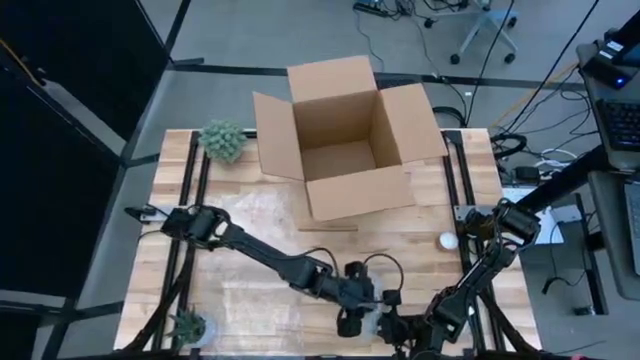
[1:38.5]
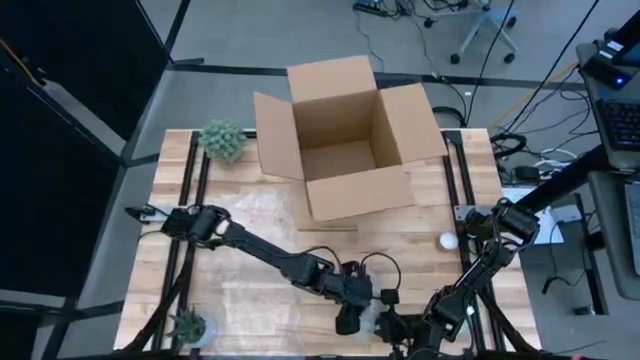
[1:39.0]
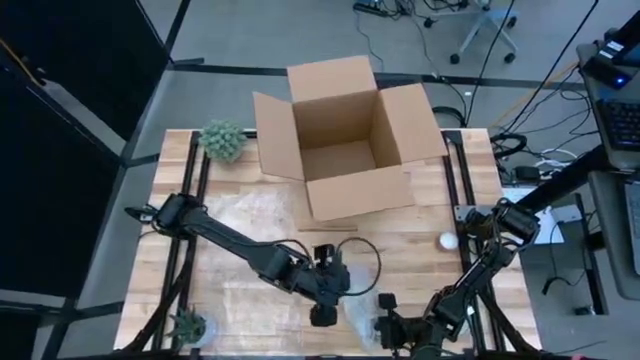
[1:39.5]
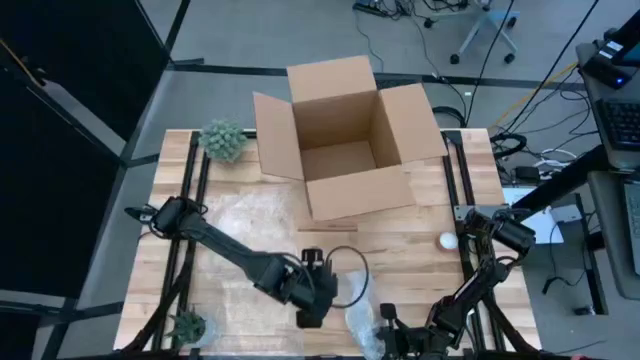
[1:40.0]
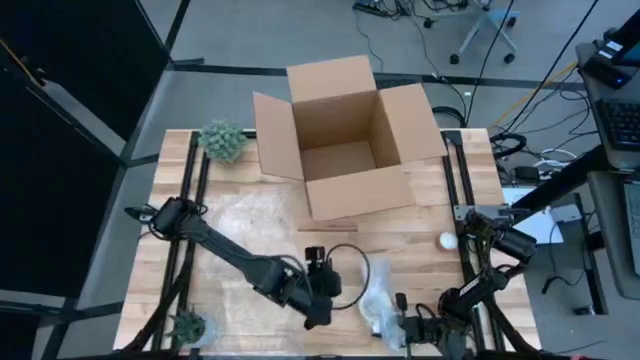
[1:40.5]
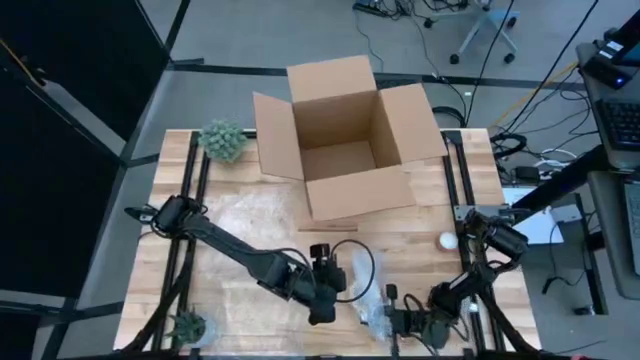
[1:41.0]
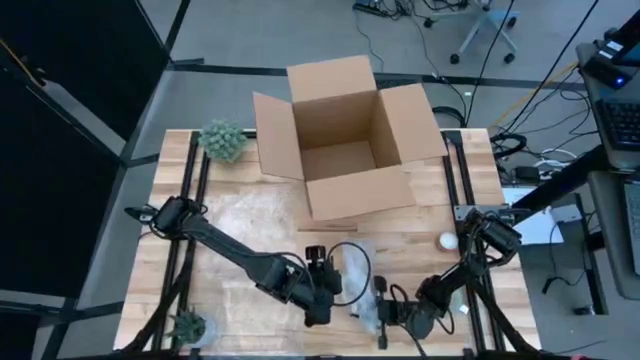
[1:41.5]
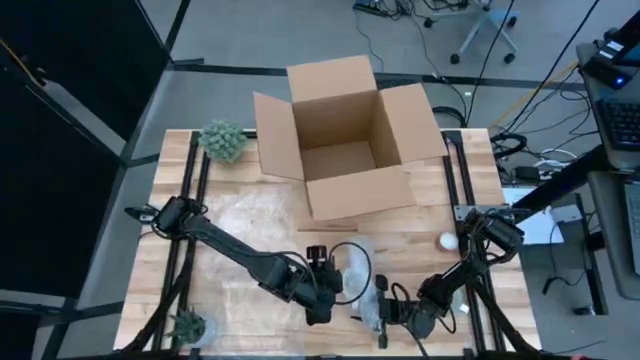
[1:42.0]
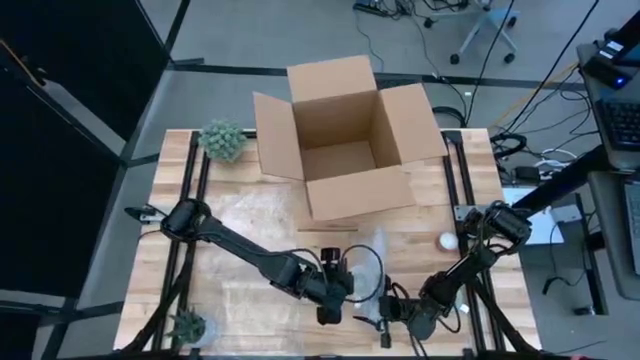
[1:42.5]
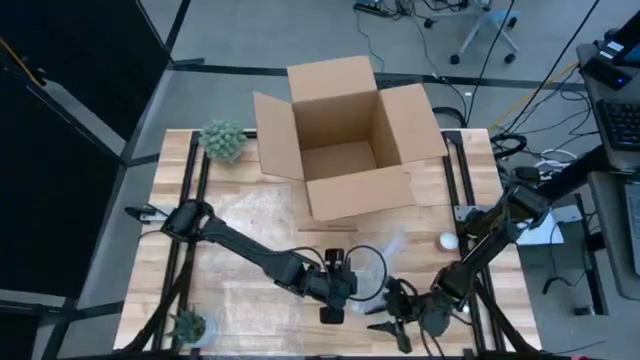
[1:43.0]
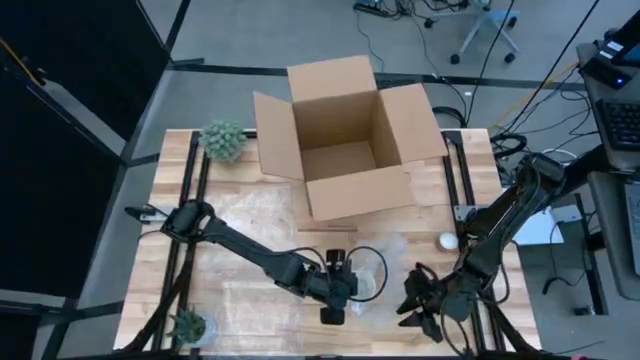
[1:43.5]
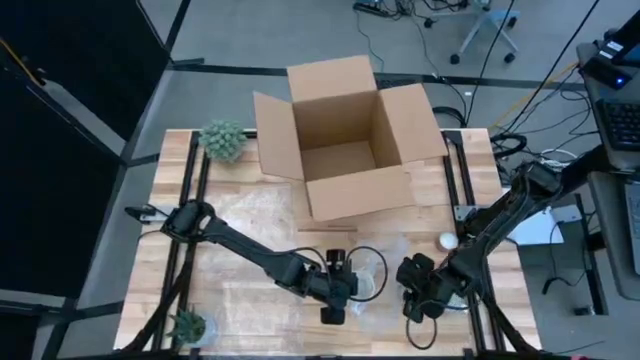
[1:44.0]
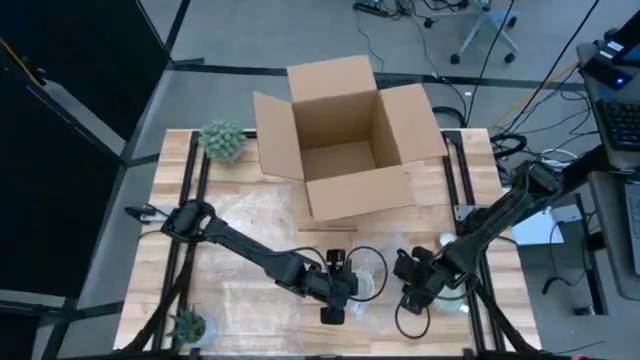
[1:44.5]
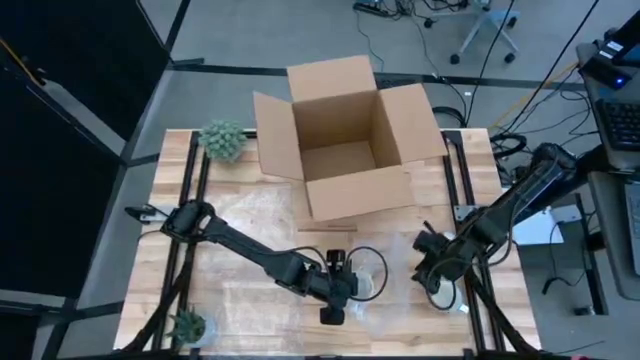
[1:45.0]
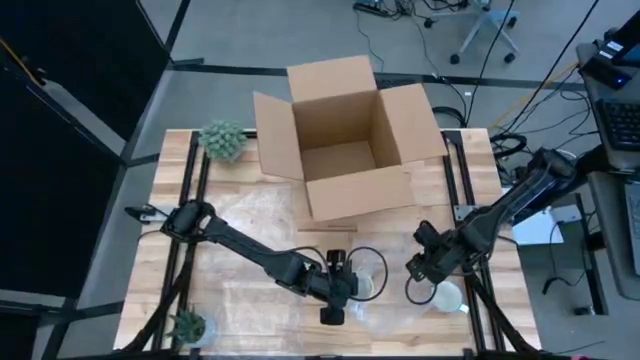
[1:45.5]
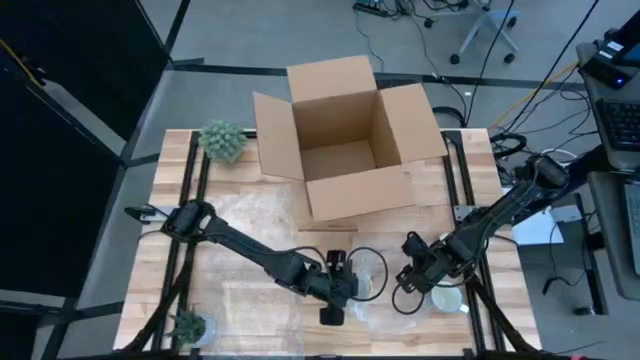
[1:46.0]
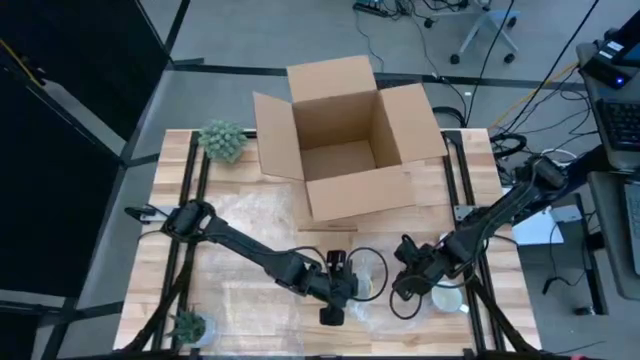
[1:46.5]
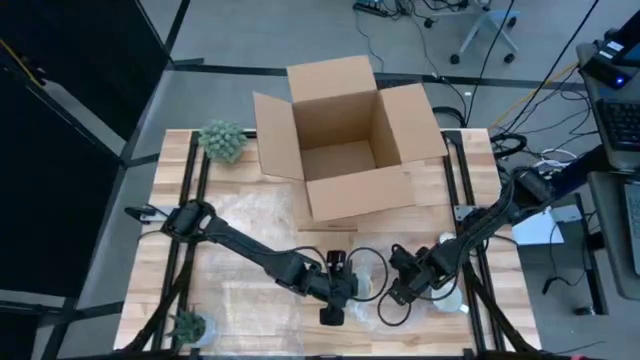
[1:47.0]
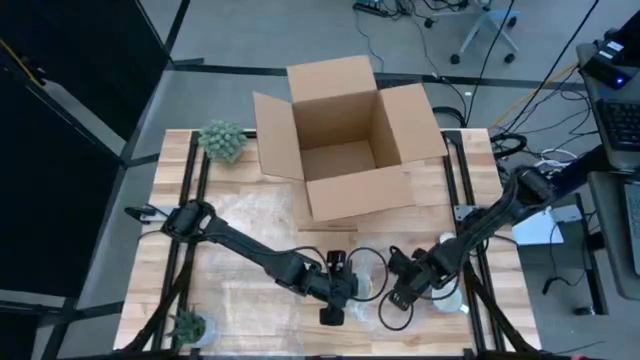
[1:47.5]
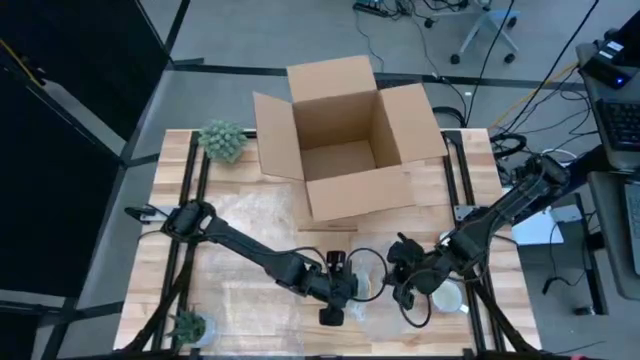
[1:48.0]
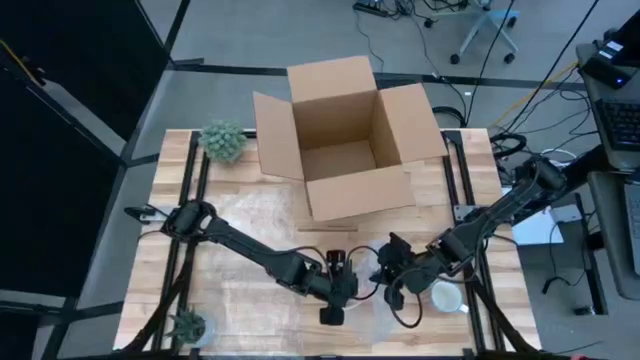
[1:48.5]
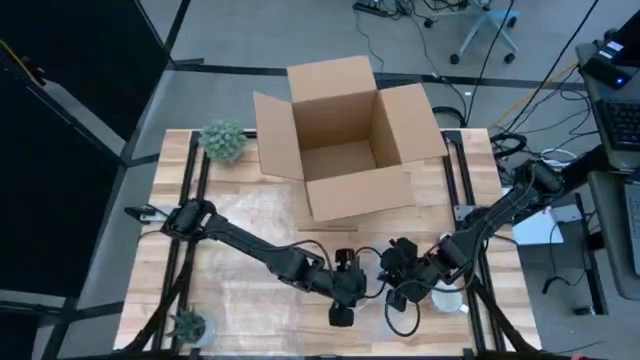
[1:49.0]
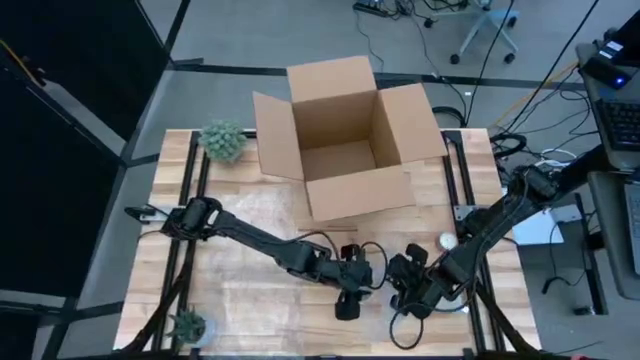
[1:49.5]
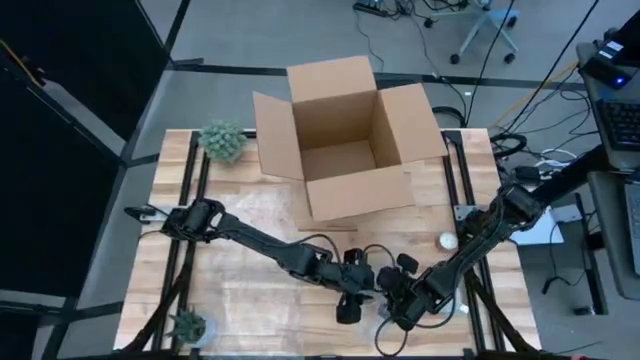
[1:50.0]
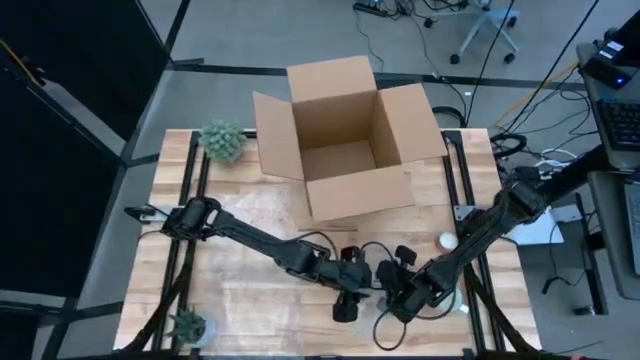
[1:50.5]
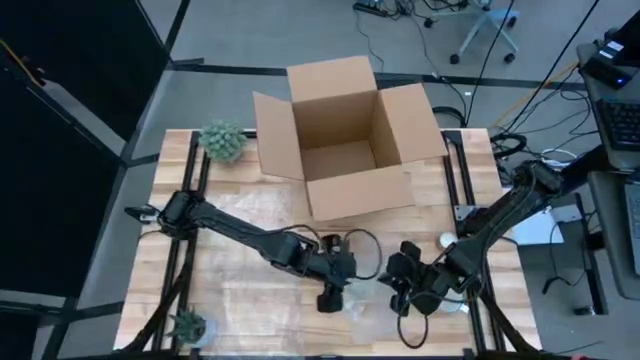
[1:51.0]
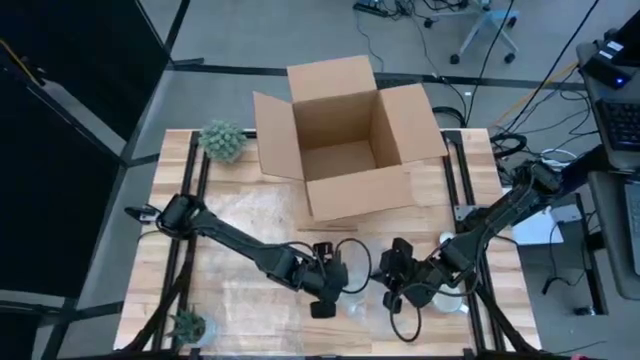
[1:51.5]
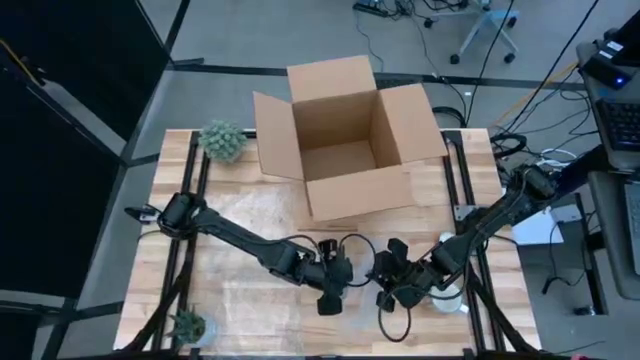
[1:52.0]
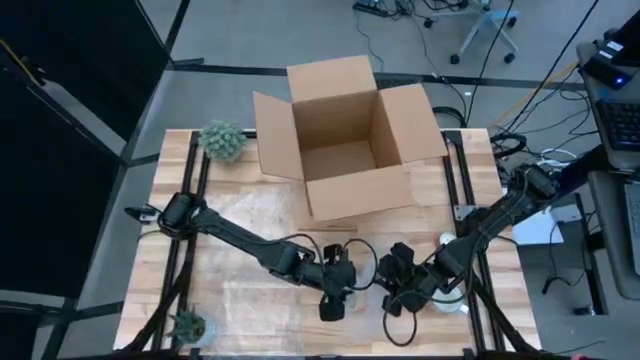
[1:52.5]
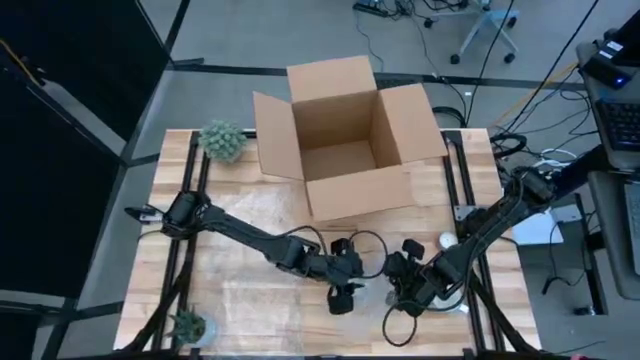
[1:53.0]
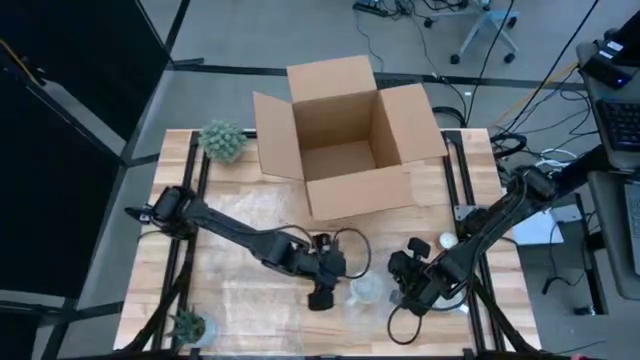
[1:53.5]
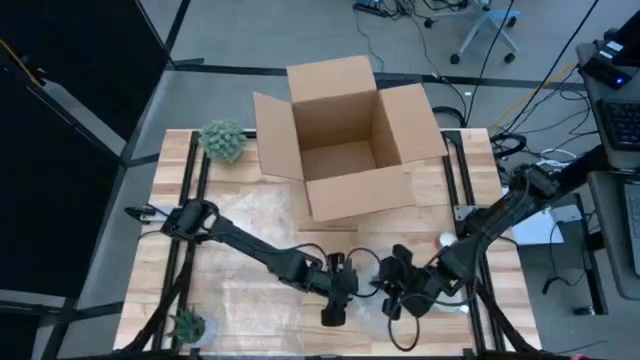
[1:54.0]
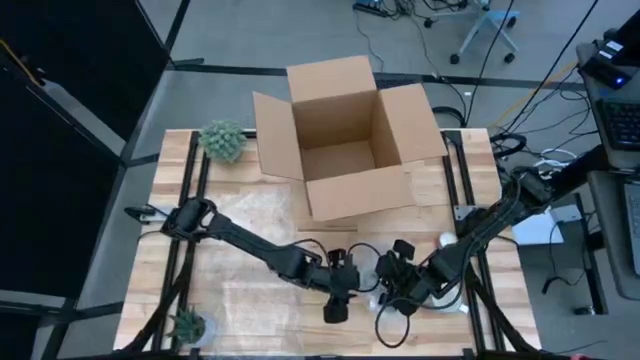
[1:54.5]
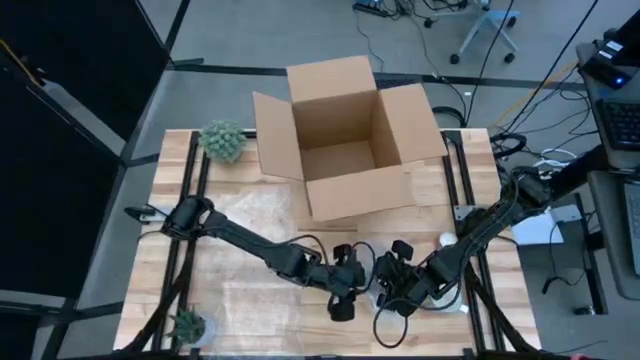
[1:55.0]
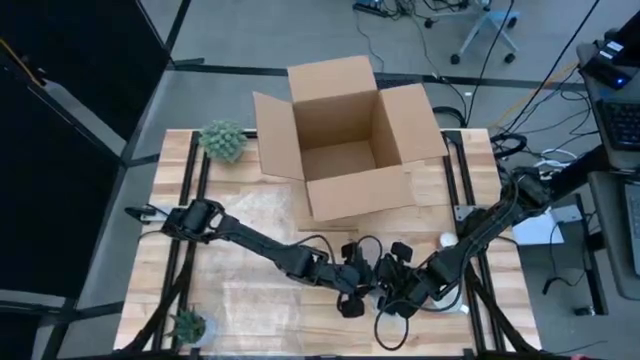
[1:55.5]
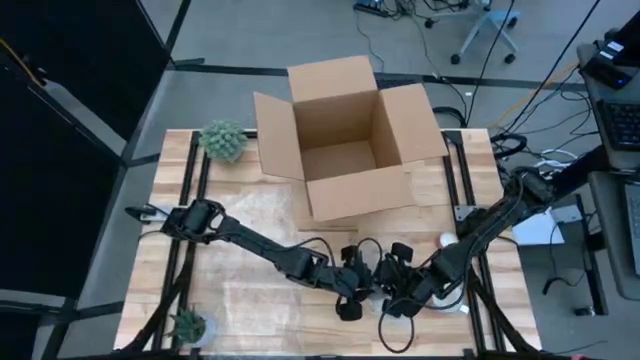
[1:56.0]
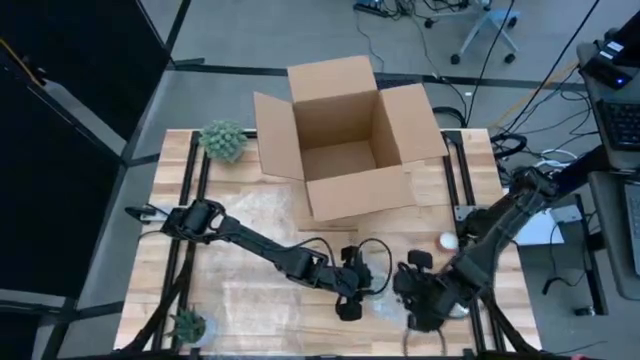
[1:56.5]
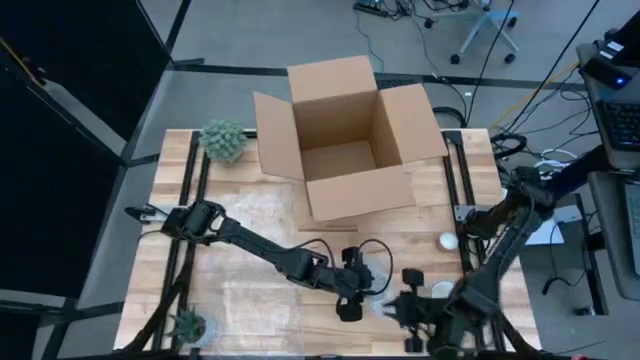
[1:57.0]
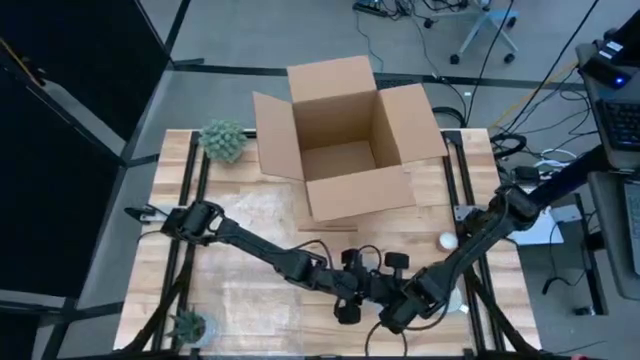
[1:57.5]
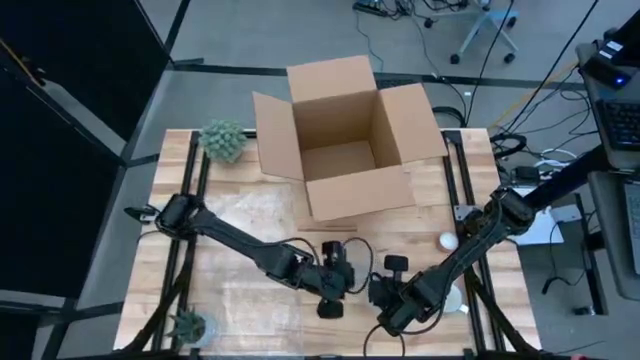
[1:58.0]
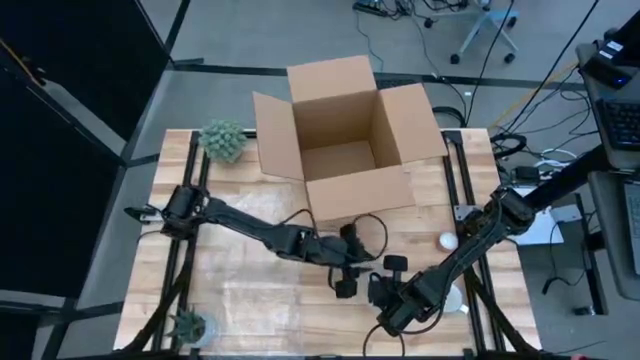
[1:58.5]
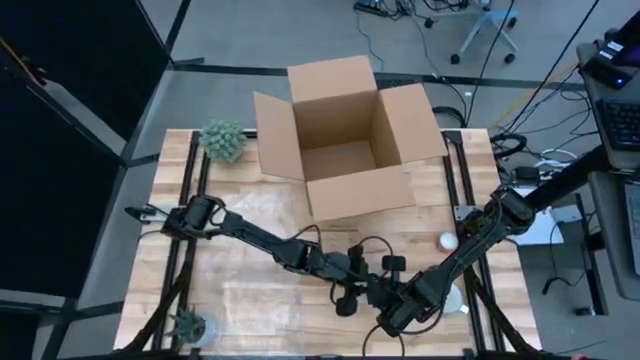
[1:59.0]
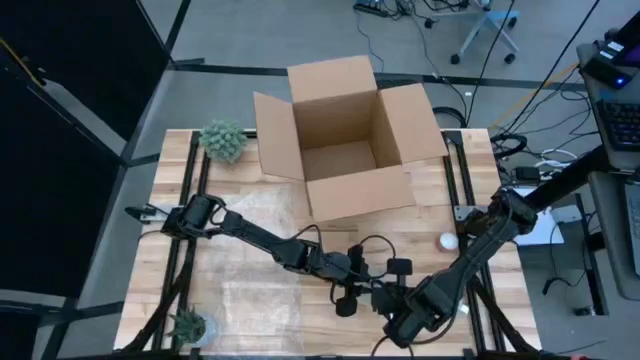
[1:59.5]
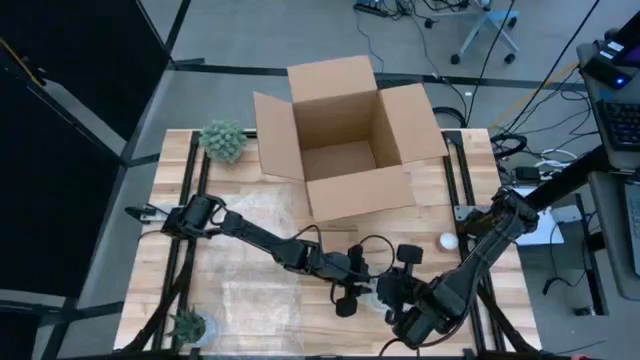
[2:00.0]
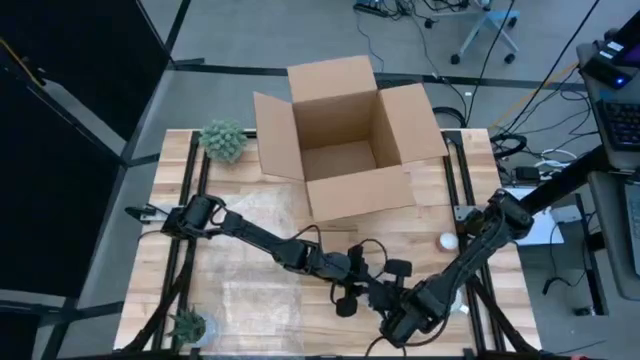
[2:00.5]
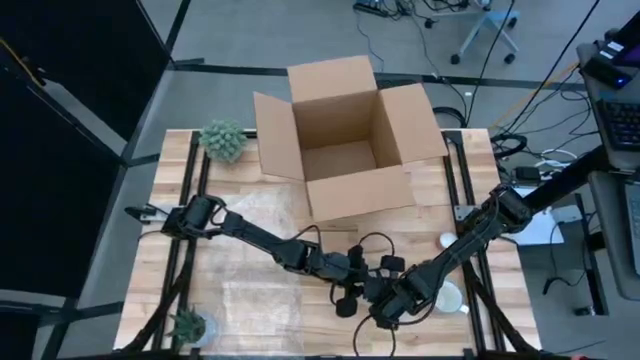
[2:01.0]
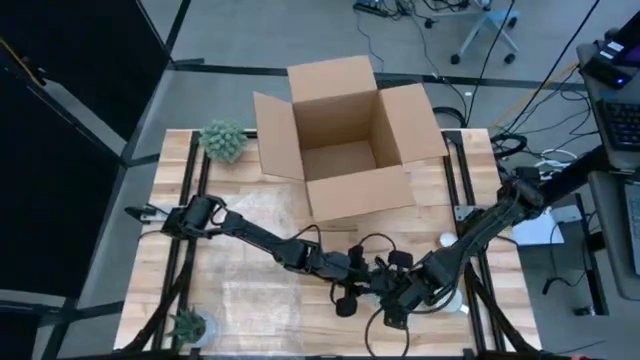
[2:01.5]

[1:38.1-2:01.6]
Task: wrap mug
Wrap the orange mug with bubble wrap
